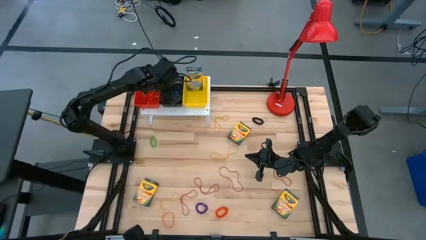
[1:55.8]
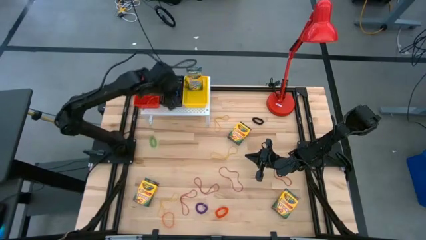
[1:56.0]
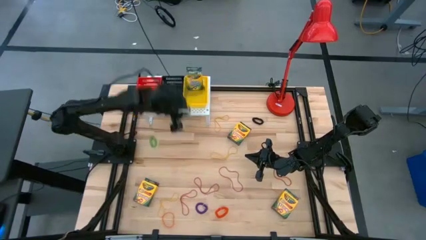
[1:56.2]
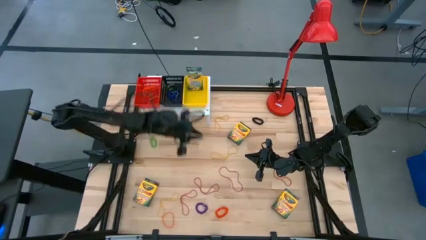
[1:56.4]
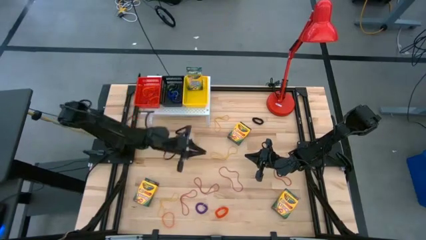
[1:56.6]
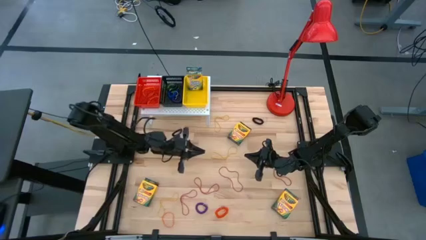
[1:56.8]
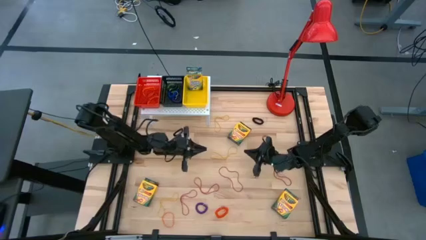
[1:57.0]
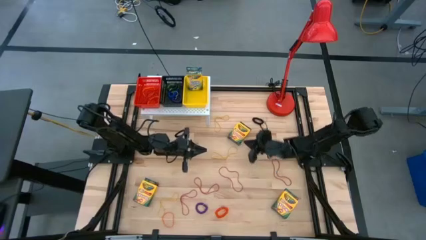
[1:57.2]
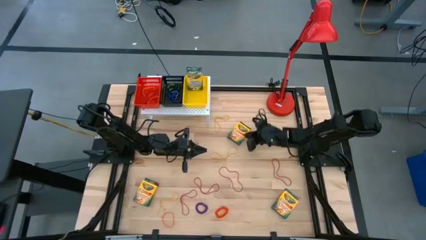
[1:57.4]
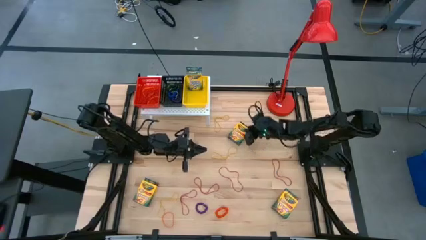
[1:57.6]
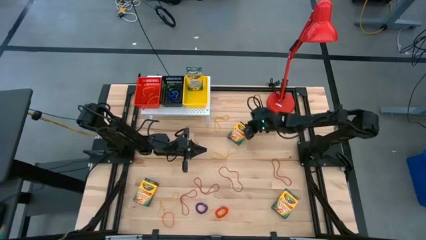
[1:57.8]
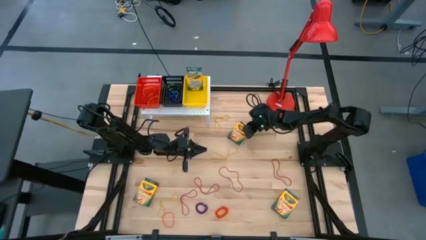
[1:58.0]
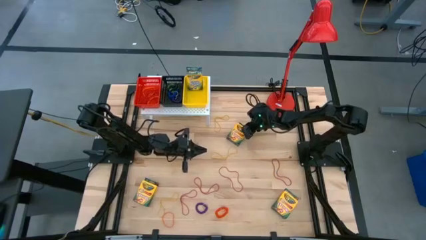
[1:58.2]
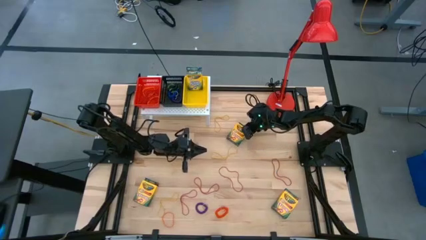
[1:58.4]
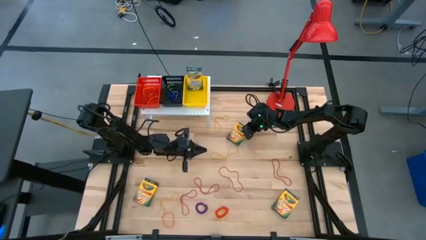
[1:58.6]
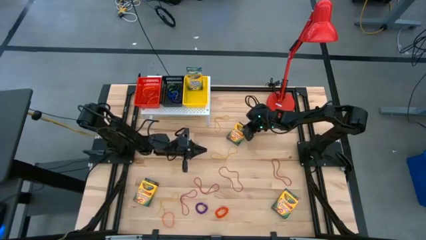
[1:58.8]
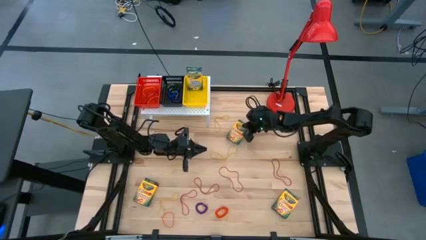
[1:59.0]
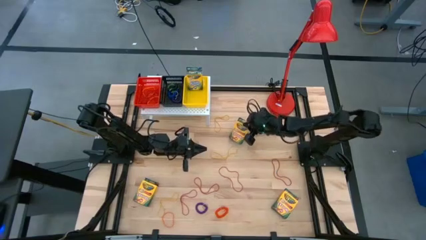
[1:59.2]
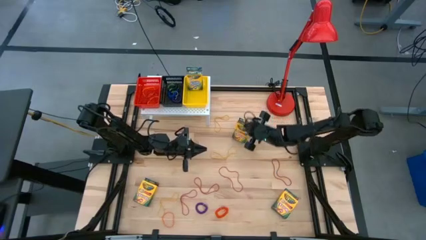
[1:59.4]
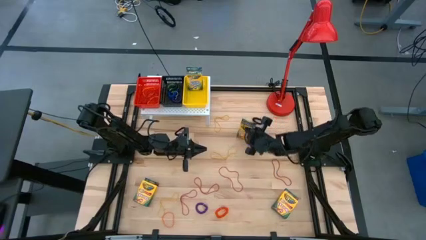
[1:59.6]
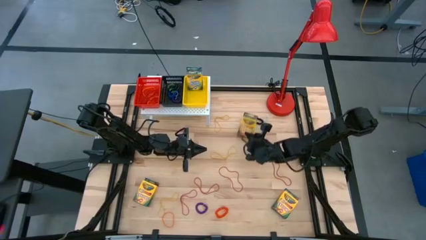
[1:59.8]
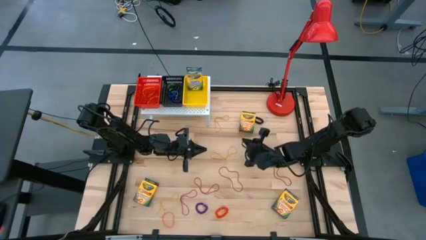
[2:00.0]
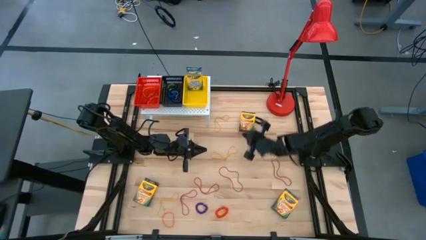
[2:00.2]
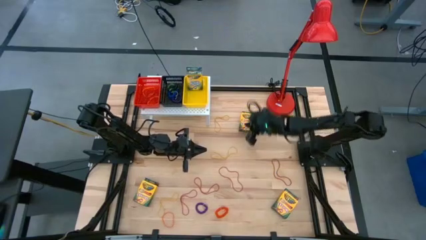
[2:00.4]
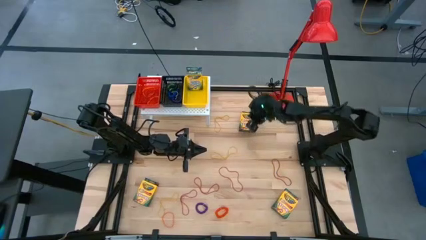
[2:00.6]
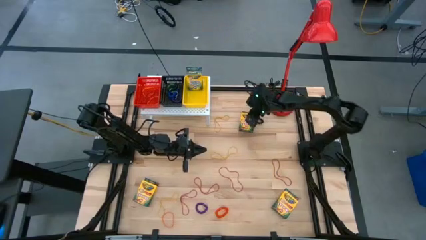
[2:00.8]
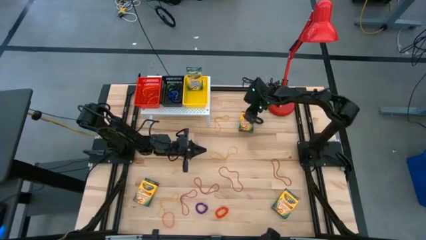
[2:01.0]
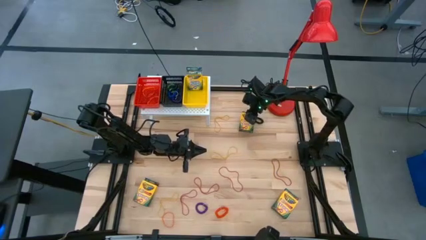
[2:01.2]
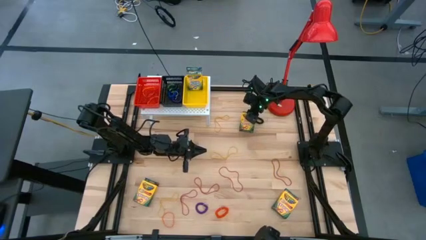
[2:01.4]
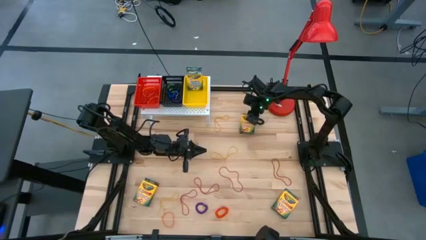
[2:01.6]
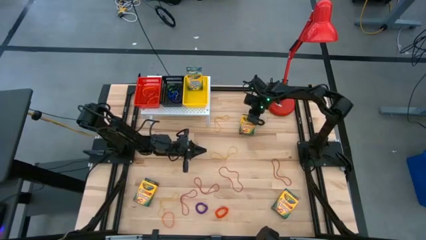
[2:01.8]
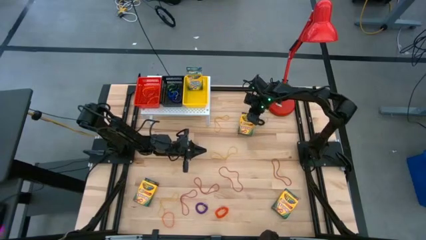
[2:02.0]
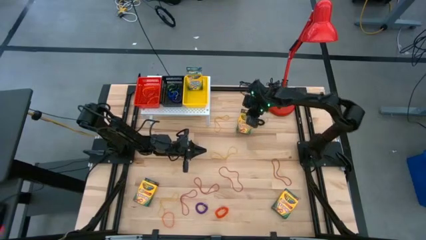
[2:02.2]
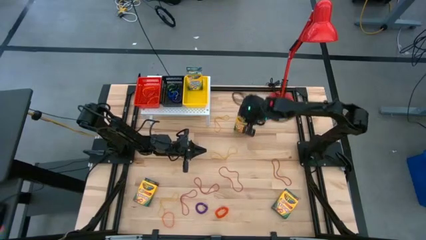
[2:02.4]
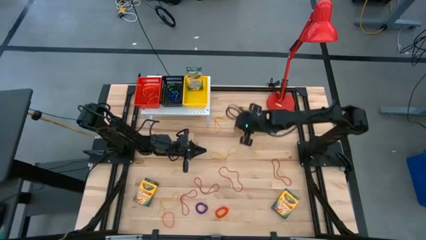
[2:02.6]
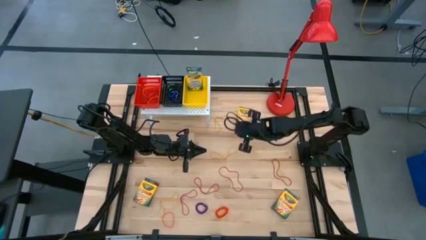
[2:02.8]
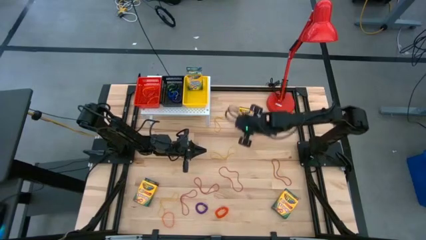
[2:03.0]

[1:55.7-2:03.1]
Task: Pick & Place Office Desk Supplies
Put the crayon box into the yellow bin on the shelf

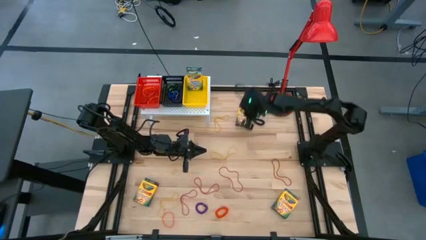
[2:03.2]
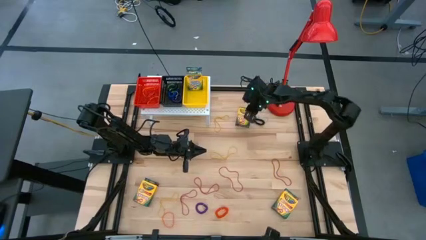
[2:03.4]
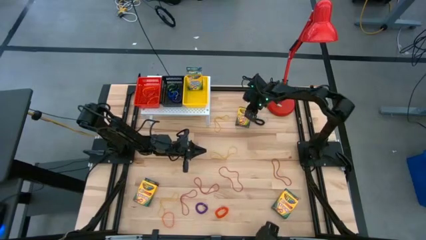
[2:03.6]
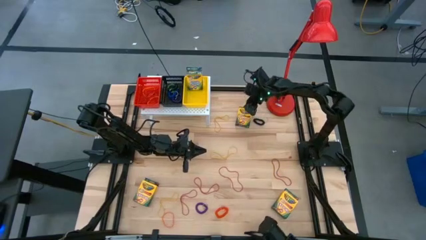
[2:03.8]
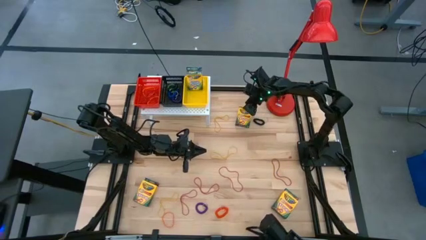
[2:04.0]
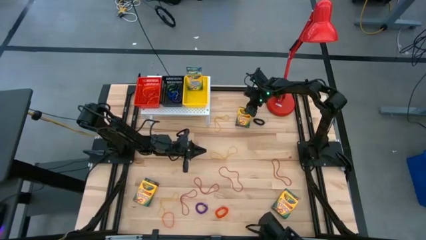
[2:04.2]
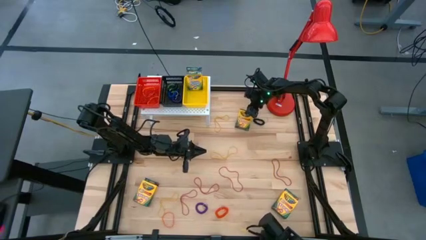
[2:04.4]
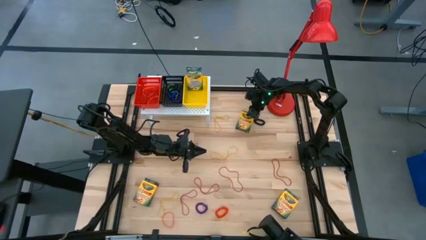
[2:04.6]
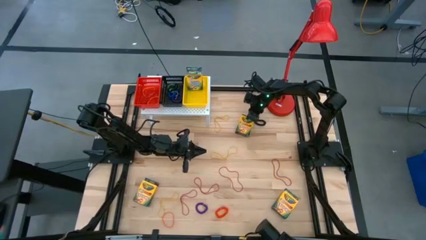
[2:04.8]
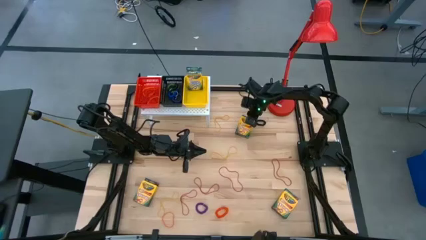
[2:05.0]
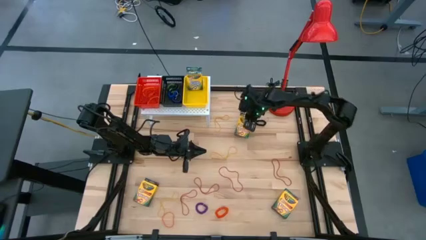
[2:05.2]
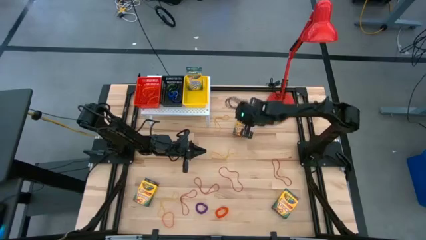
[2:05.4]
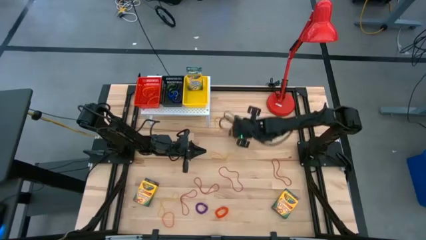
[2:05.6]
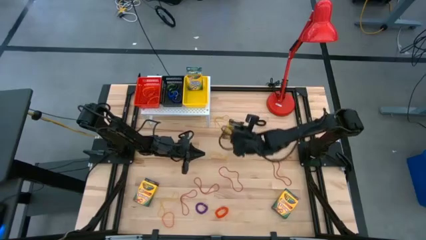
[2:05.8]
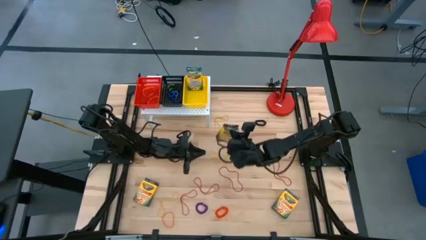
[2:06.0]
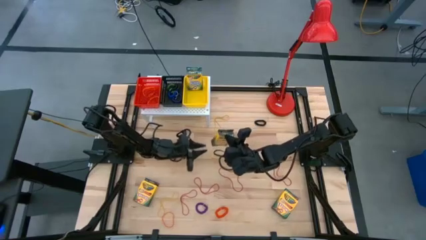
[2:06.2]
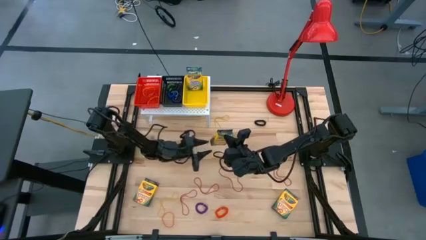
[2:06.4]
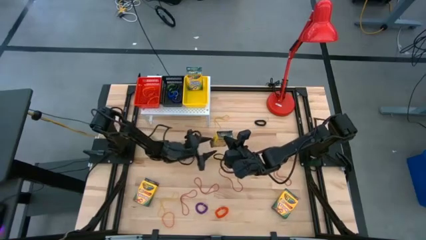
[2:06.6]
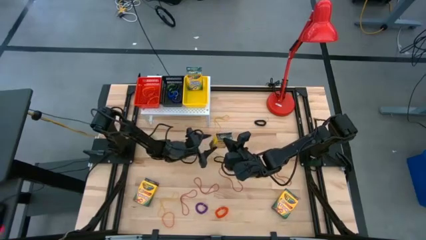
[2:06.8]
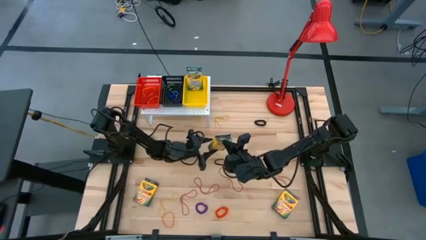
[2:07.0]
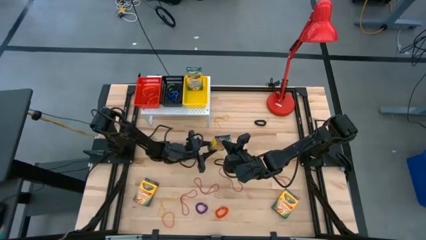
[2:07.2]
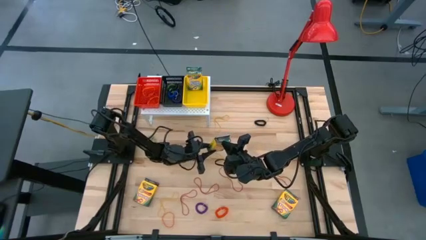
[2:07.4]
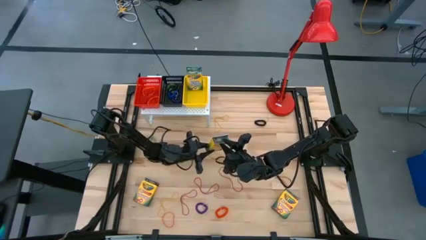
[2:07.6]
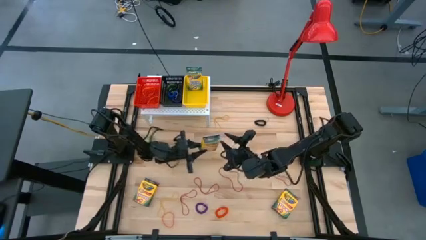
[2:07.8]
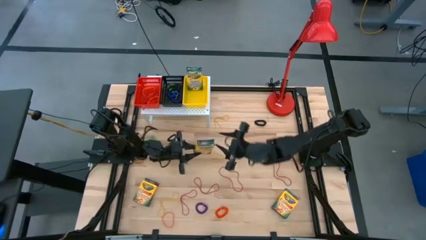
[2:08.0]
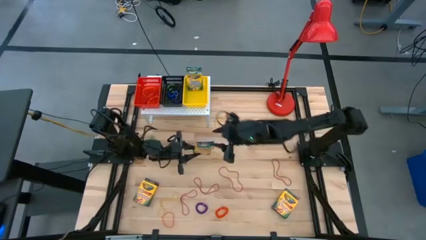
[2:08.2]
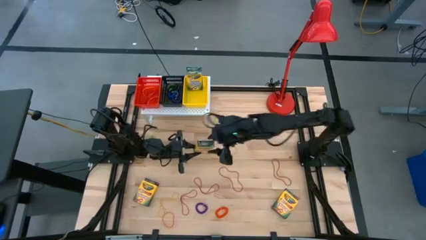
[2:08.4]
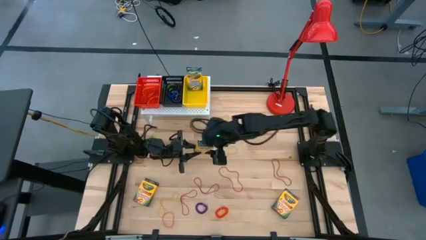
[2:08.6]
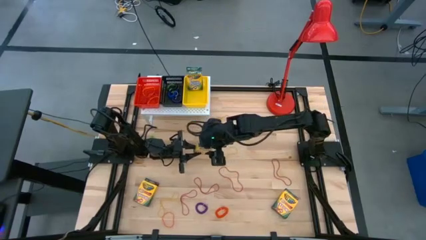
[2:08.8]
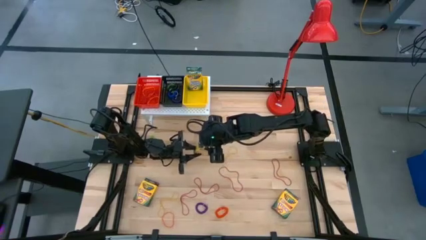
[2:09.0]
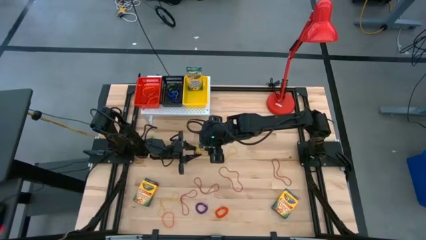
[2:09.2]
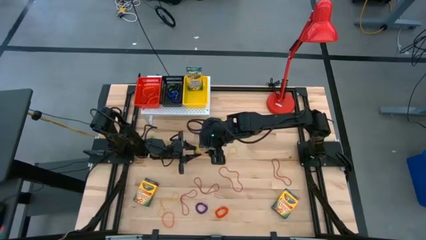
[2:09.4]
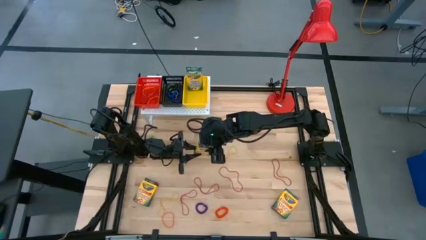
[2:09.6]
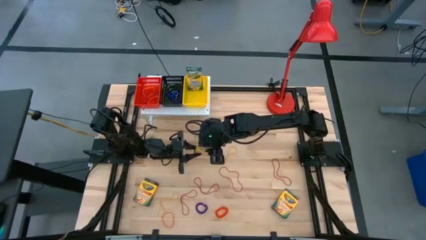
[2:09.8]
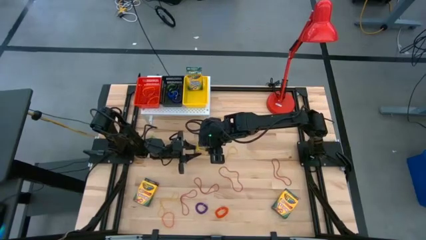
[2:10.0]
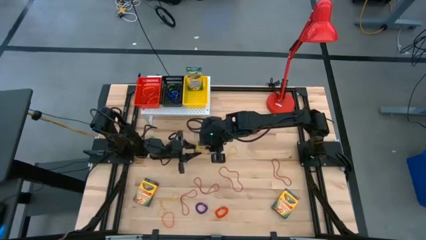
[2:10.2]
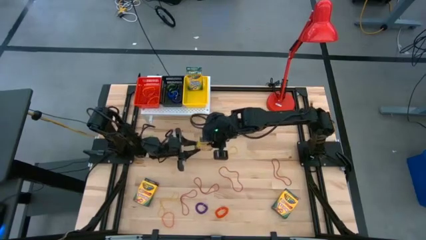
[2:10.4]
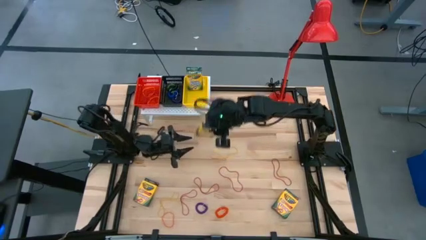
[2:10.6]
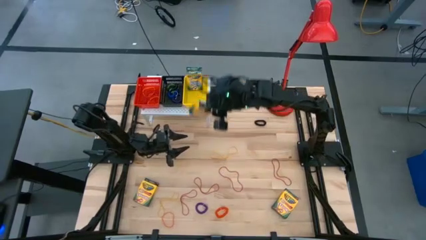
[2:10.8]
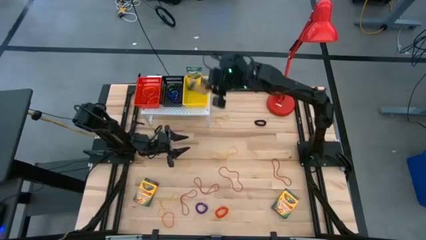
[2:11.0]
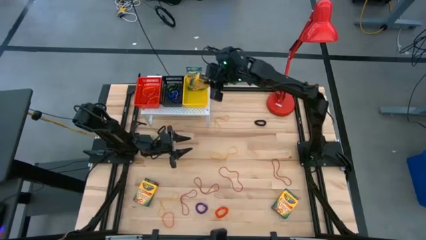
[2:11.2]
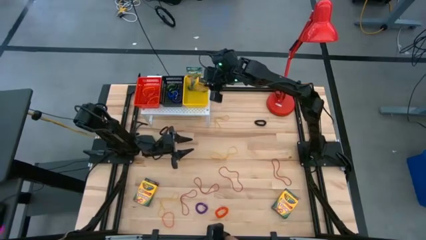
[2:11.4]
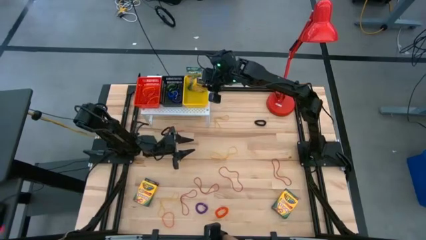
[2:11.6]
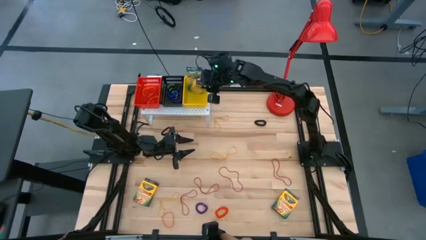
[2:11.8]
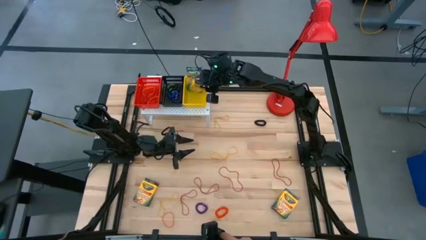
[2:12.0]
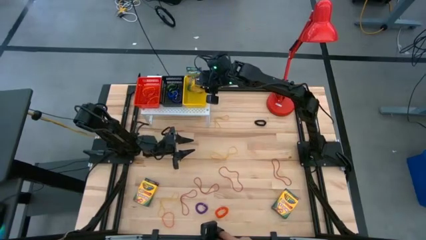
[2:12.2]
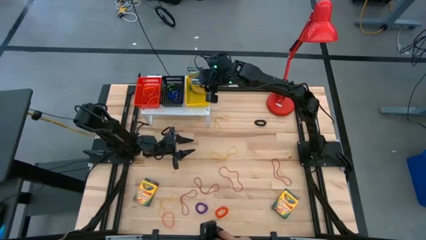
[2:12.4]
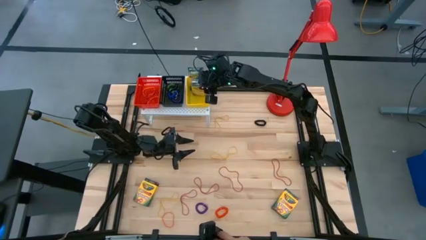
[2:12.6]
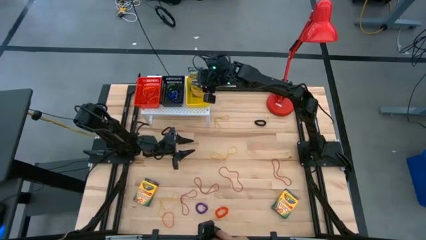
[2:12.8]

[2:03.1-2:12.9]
Put the crayon box into the yellow bin on the shelf
